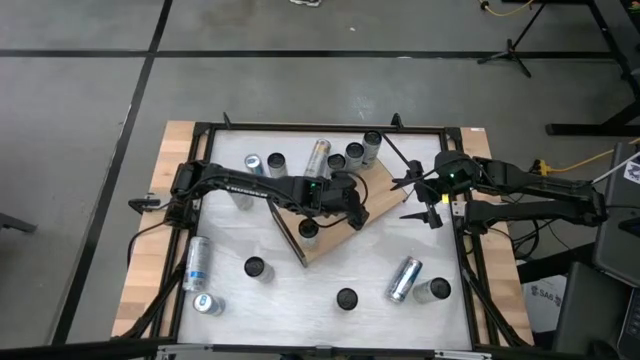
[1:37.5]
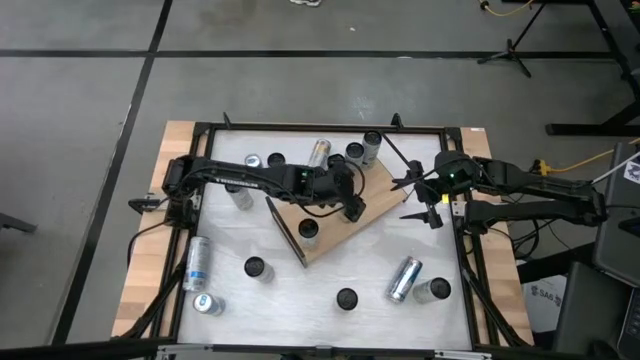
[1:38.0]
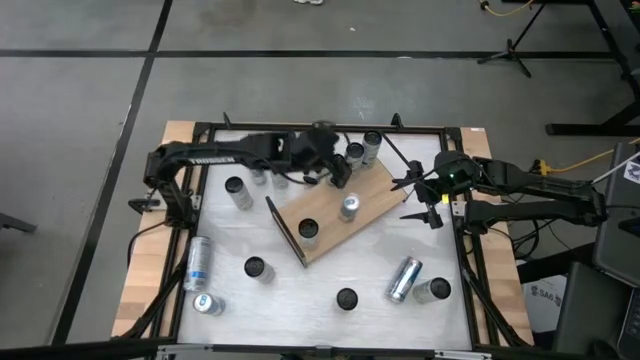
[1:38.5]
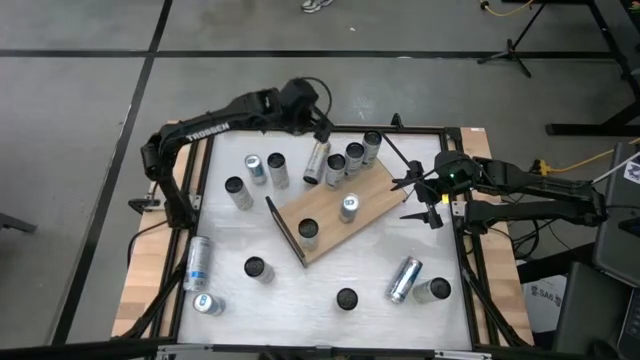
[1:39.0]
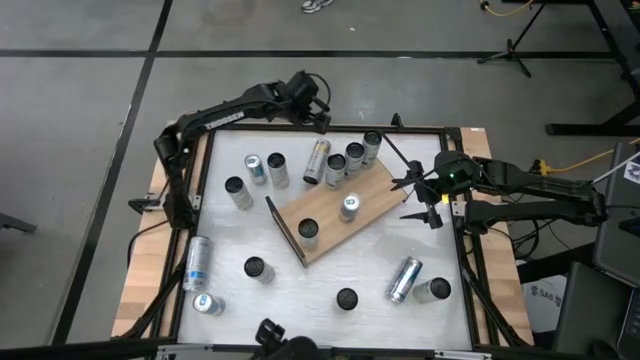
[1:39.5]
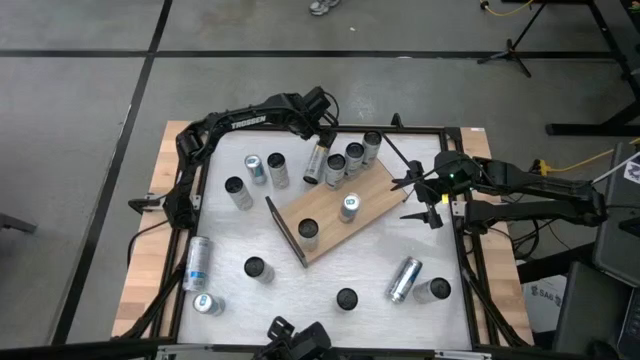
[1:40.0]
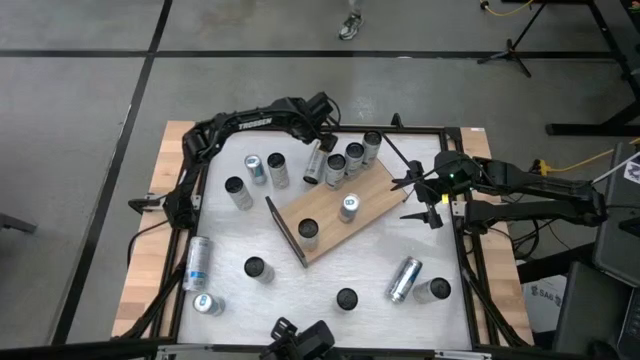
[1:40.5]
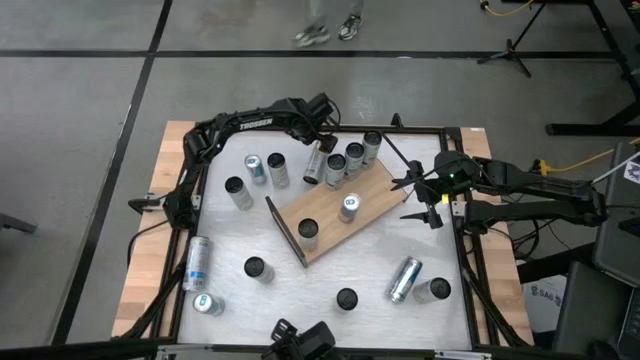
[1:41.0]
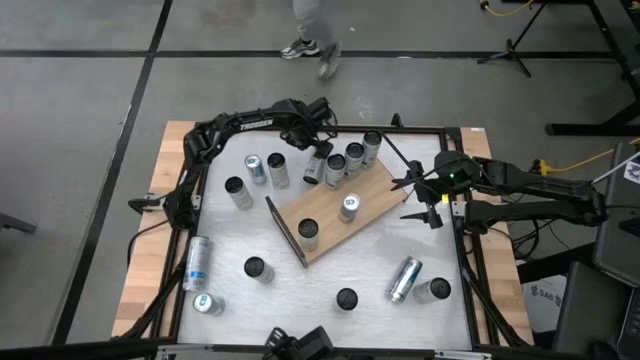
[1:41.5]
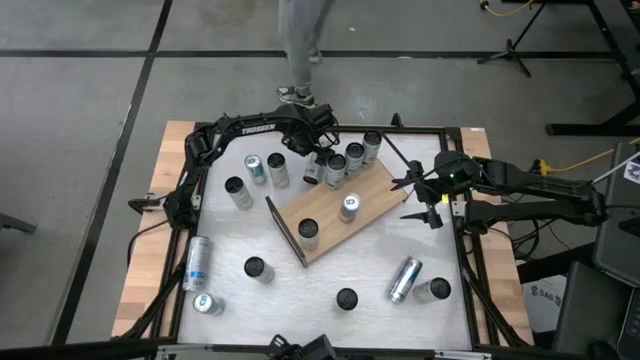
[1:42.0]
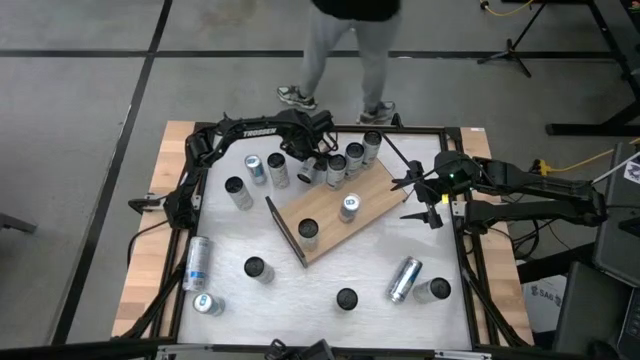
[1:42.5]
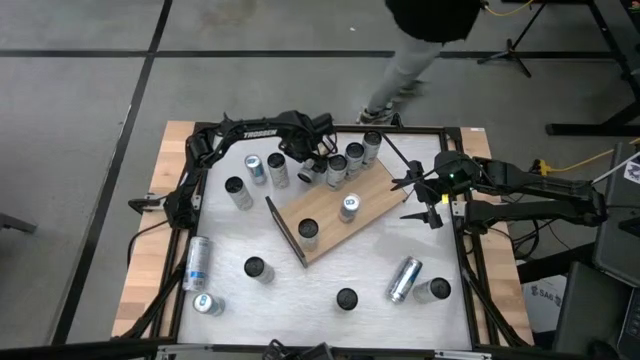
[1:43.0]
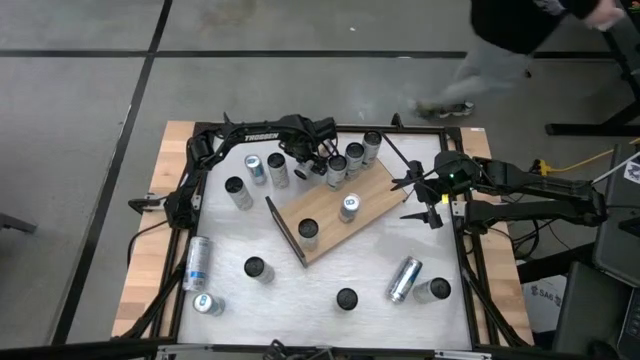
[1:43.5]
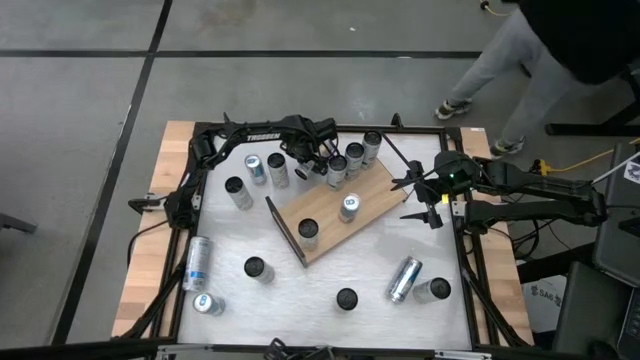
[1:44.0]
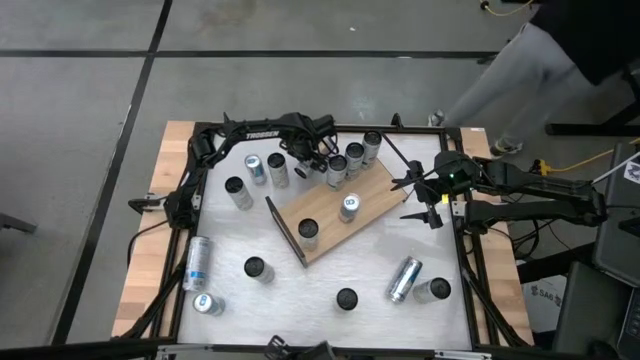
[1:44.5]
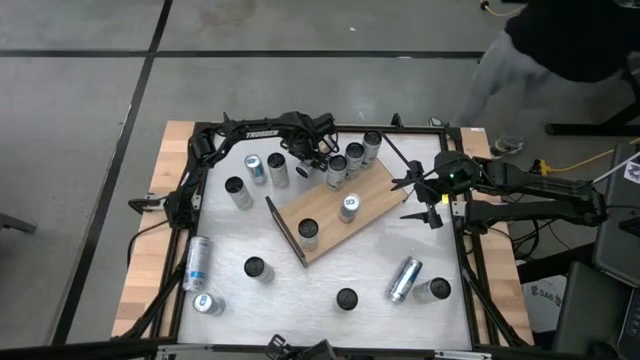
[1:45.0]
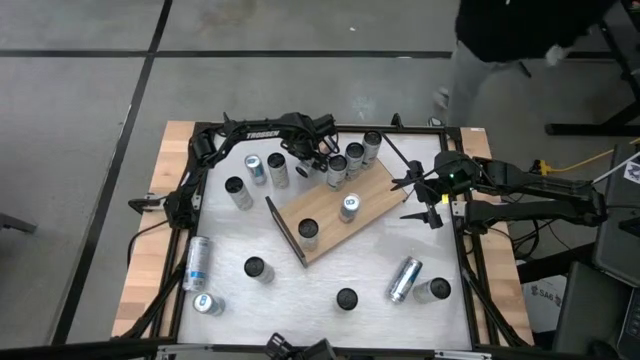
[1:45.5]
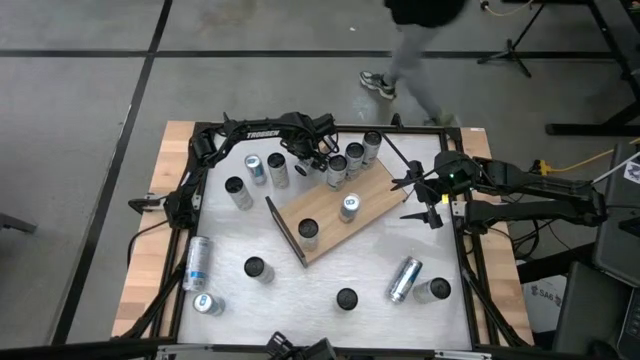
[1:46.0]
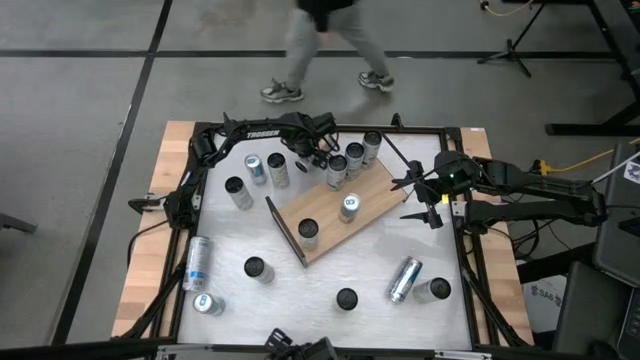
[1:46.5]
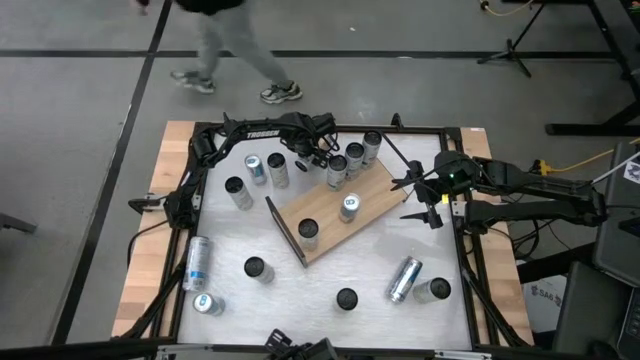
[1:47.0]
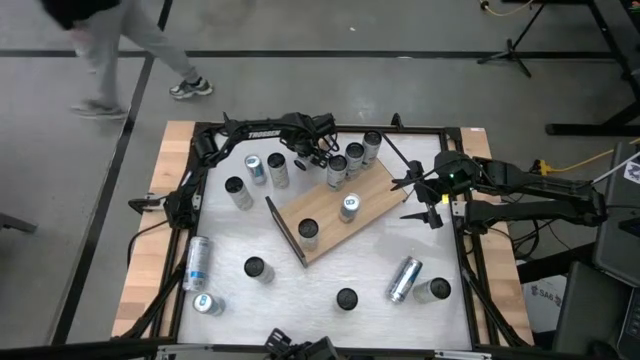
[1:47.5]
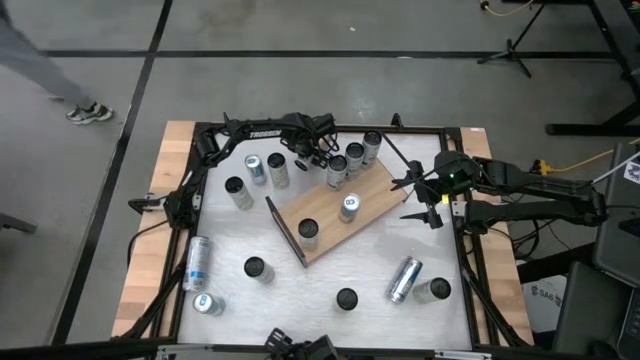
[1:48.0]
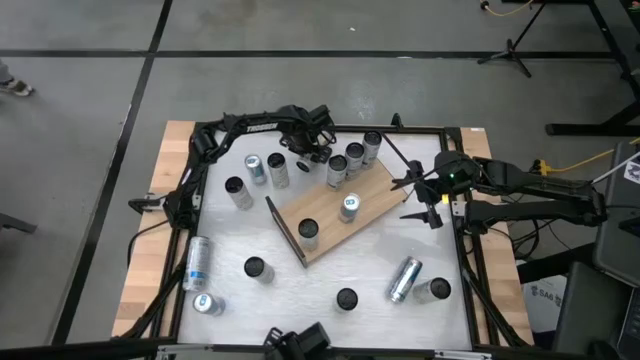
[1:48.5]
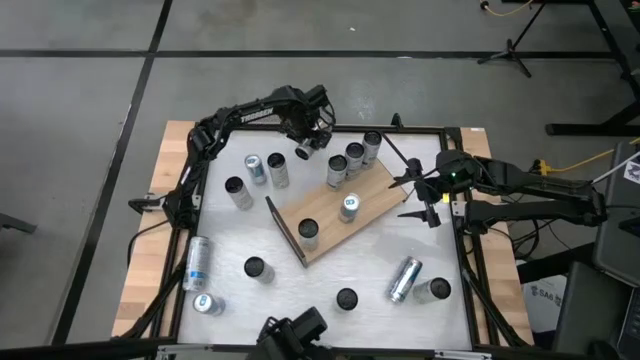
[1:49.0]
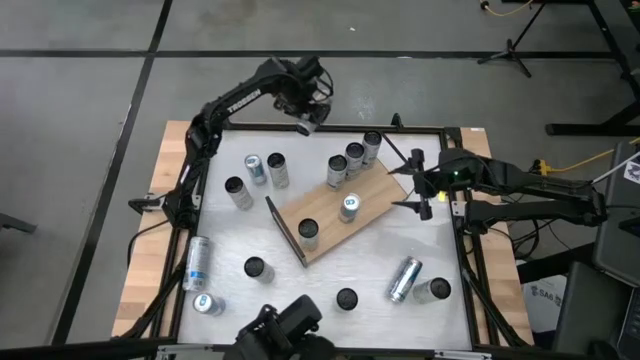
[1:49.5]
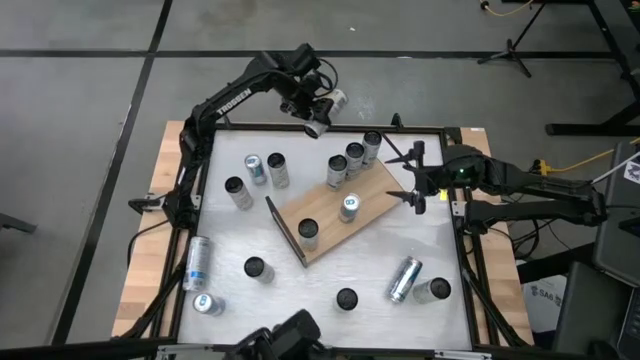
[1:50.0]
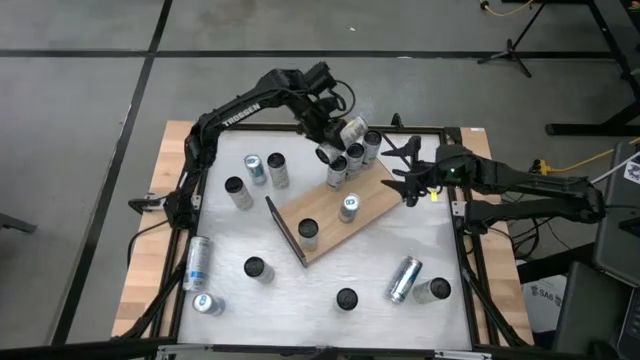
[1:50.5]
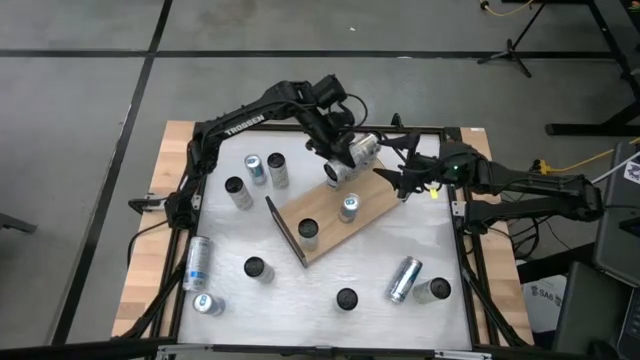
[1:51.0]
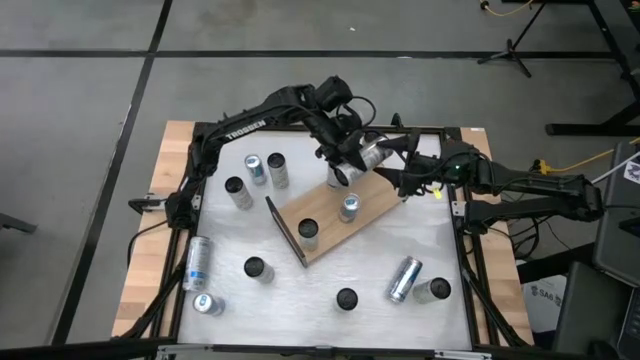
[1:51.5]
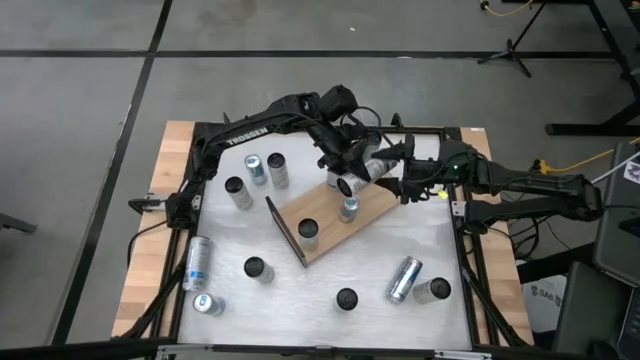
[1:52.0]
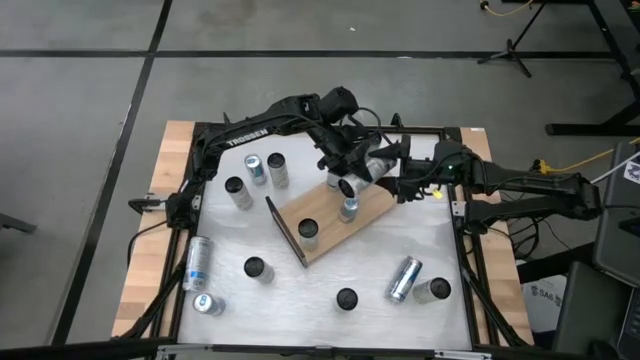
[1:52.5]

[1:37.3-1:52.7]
Task: Place canned beverage on shelf
Put the white yellow soda can on the shelf

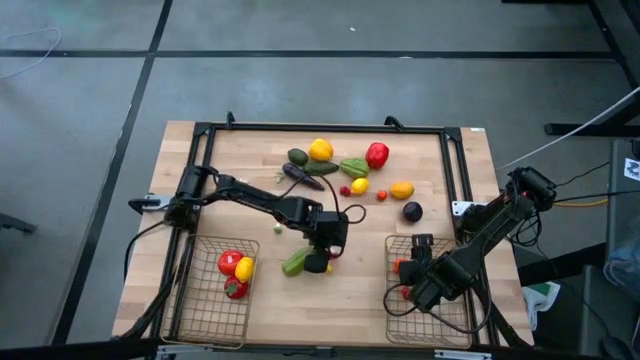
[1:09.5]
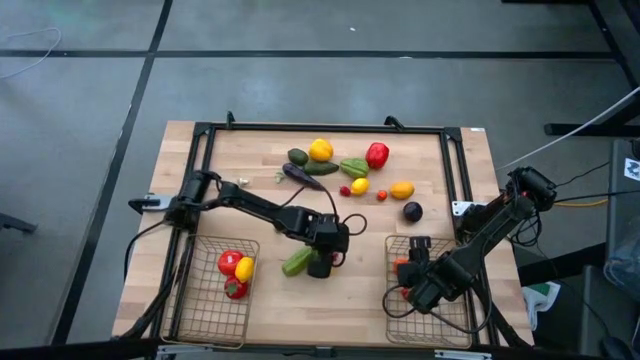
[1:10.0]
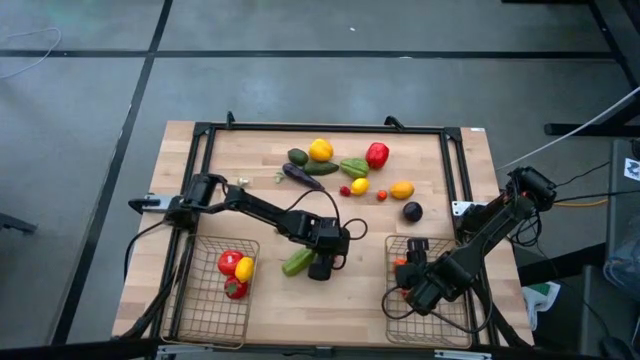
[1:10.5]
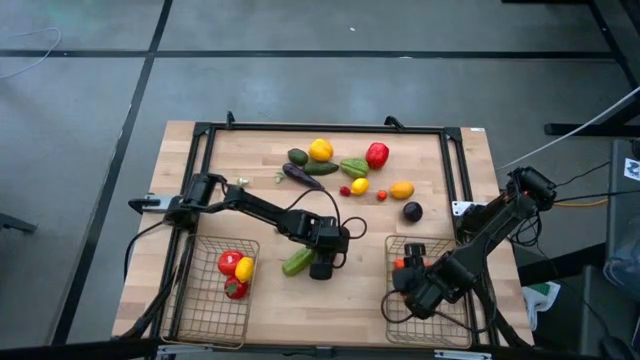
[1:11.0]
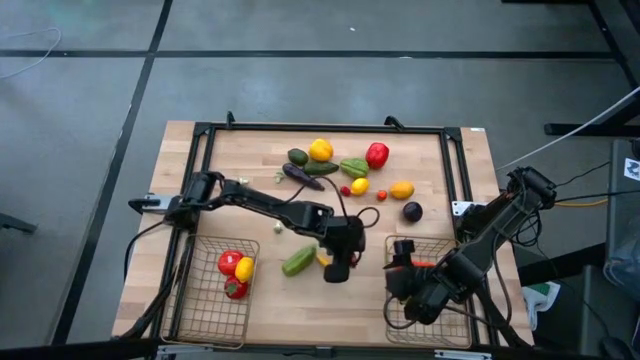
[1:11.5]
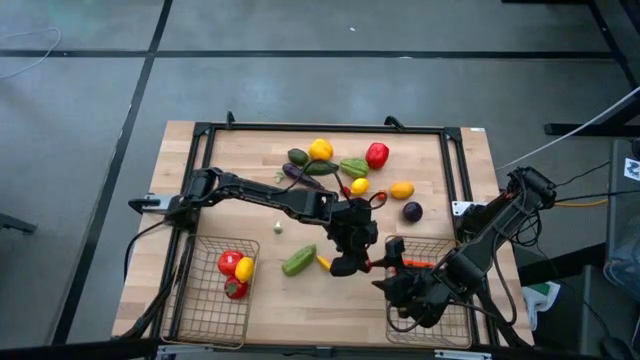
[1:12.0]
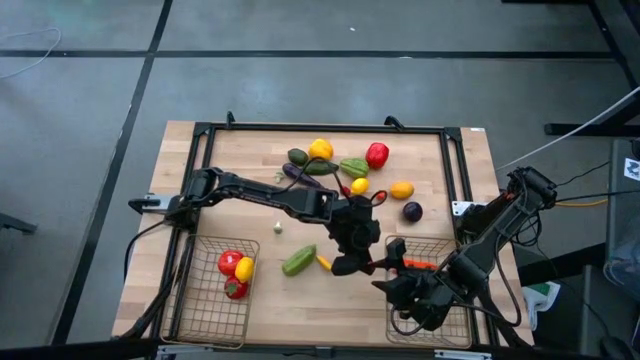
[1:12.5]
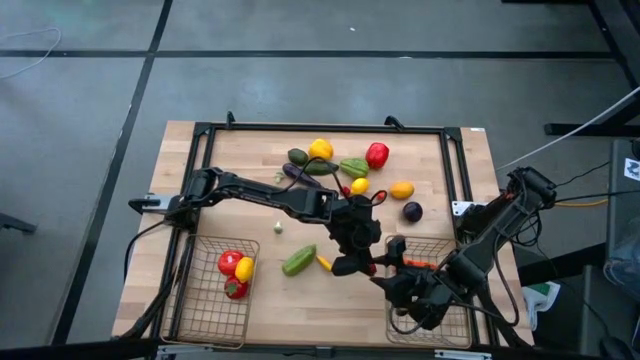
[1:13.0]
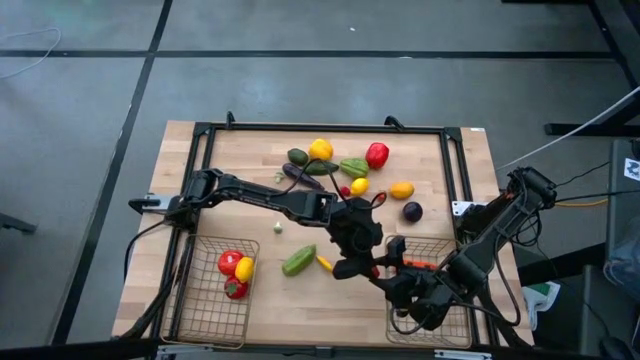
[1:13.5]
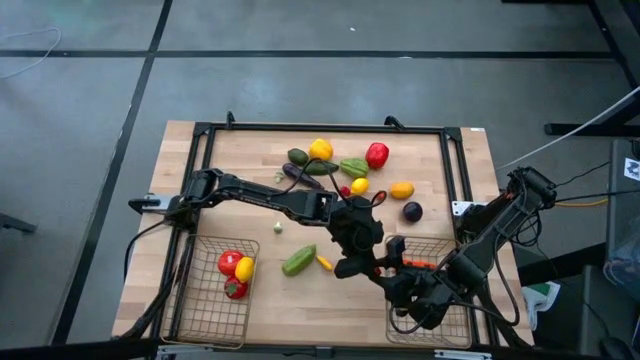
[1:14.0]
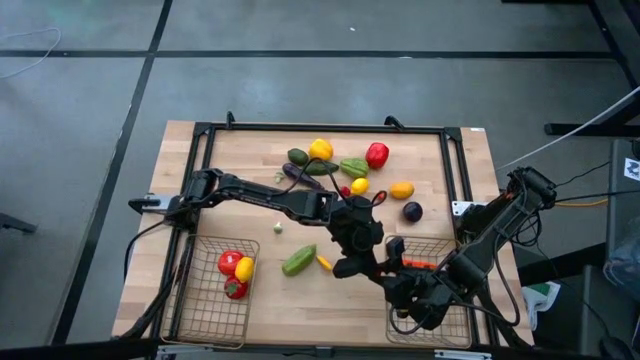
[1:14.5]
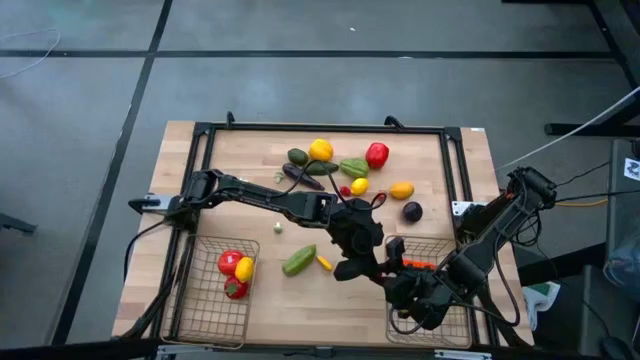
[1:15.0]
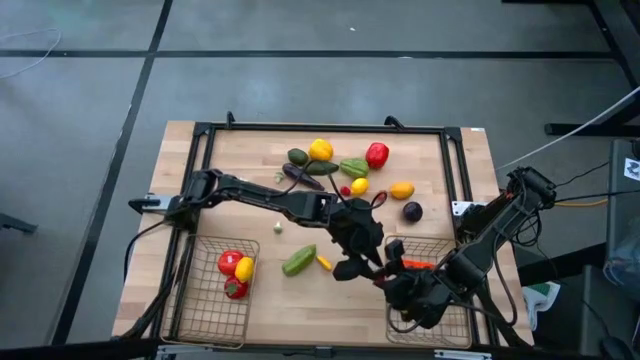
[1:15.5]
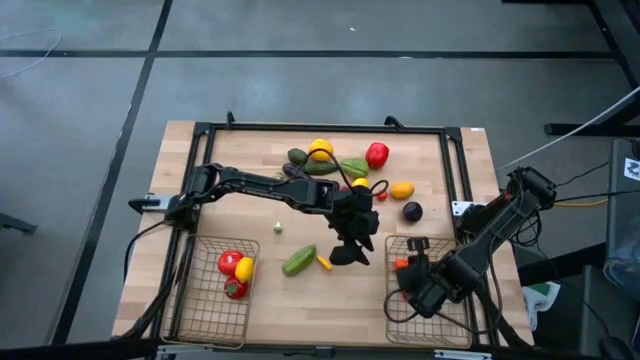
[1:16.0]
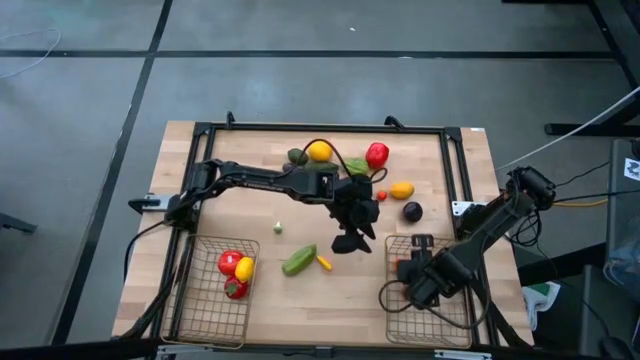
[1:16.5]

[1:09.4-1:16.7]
Task: Sort produce into baskets
Put the orange mushroom into the right wire basket
